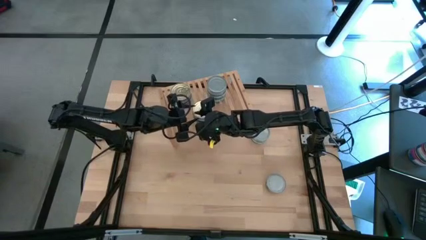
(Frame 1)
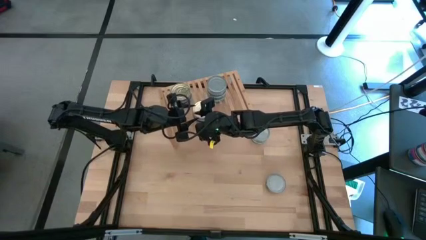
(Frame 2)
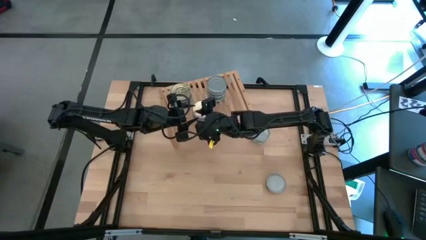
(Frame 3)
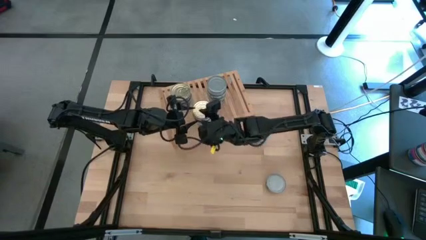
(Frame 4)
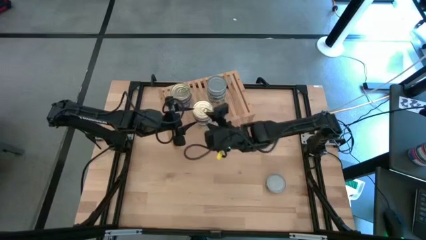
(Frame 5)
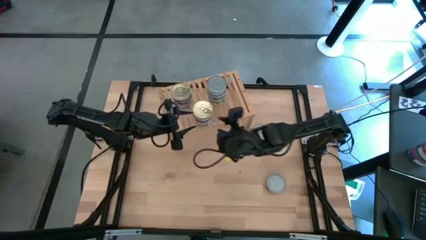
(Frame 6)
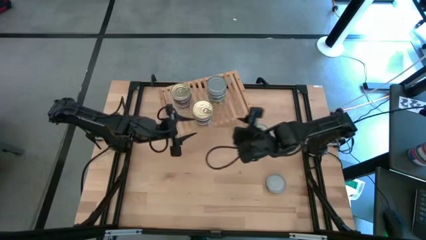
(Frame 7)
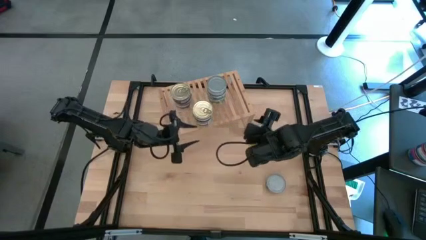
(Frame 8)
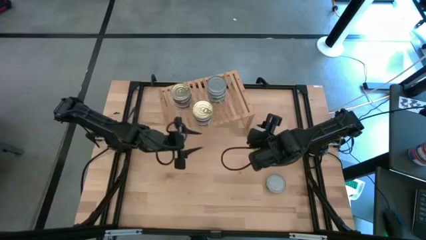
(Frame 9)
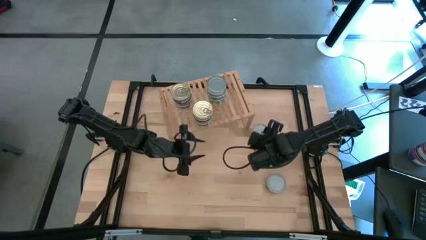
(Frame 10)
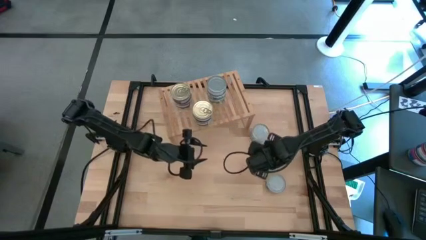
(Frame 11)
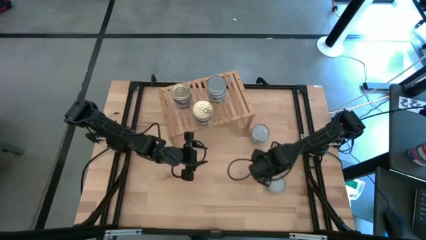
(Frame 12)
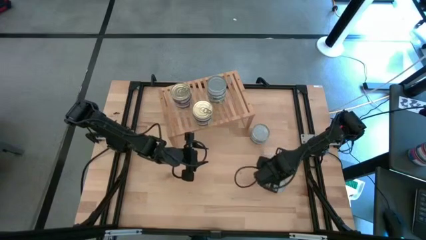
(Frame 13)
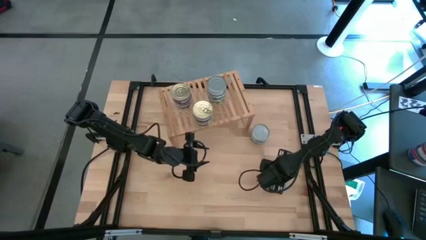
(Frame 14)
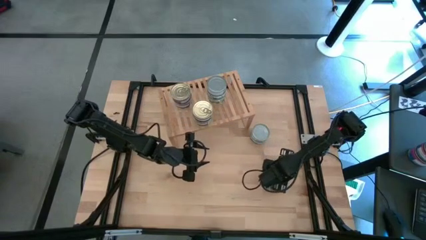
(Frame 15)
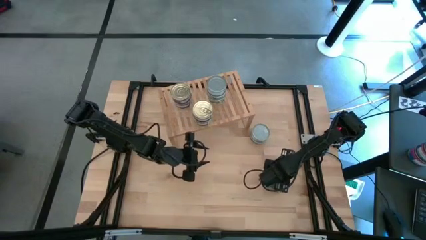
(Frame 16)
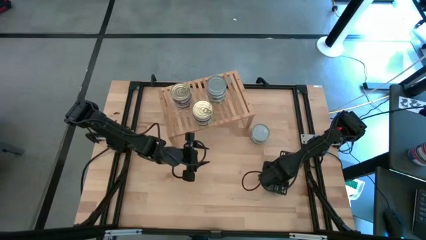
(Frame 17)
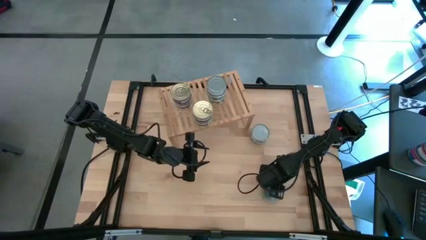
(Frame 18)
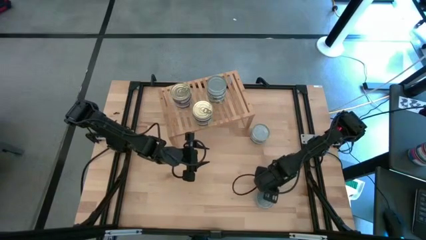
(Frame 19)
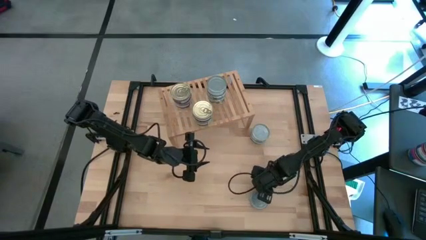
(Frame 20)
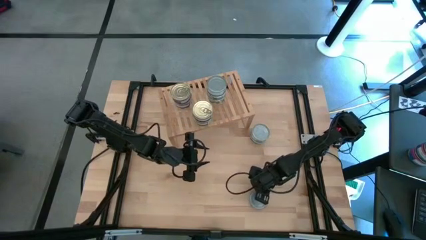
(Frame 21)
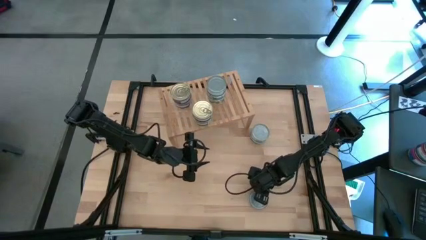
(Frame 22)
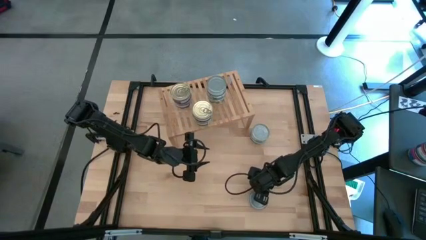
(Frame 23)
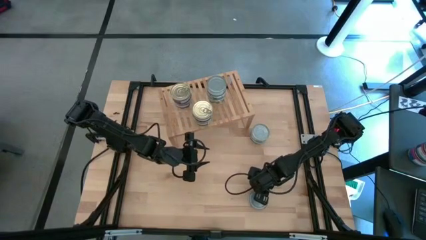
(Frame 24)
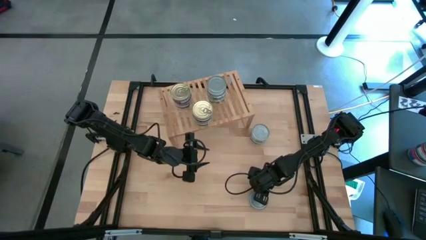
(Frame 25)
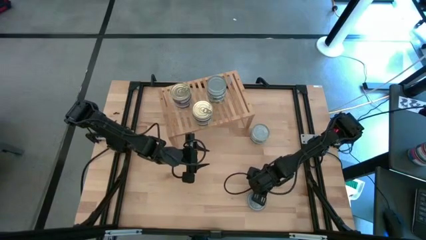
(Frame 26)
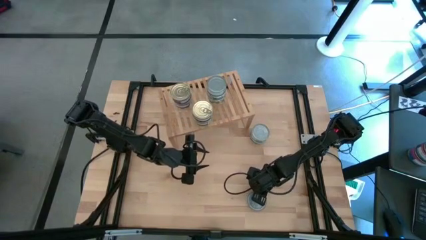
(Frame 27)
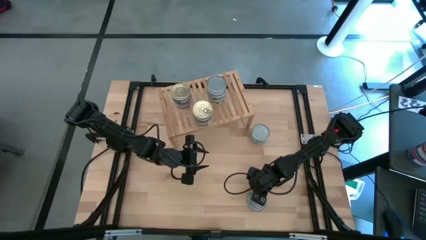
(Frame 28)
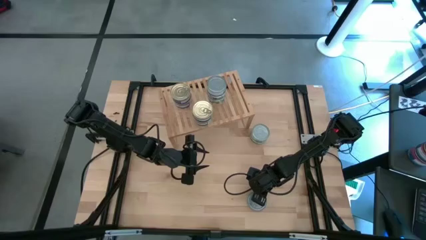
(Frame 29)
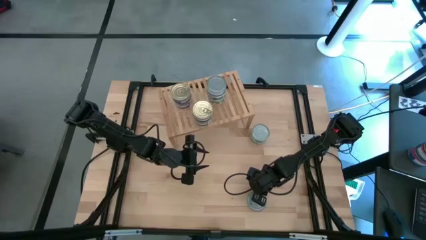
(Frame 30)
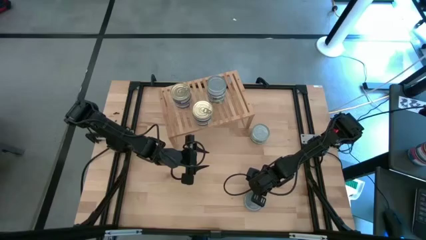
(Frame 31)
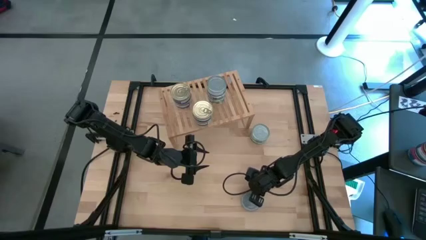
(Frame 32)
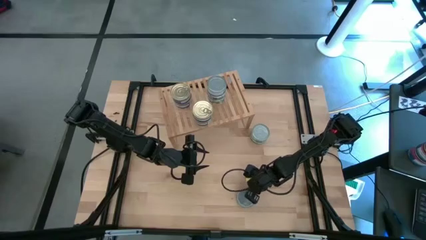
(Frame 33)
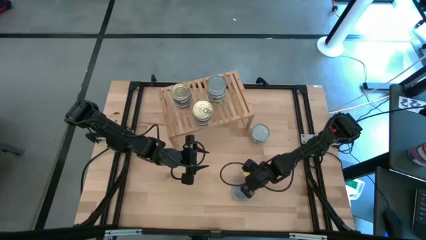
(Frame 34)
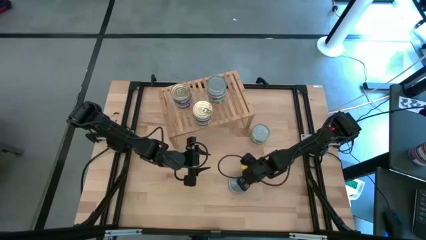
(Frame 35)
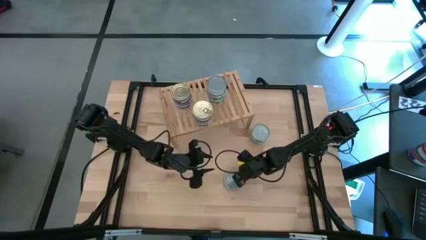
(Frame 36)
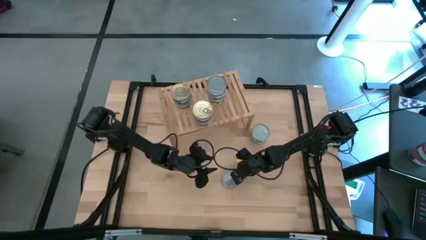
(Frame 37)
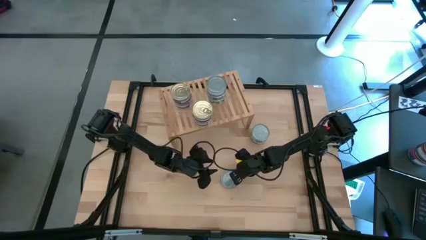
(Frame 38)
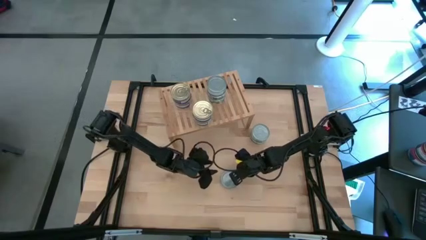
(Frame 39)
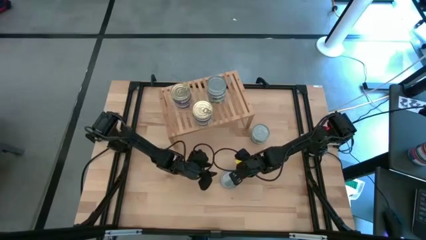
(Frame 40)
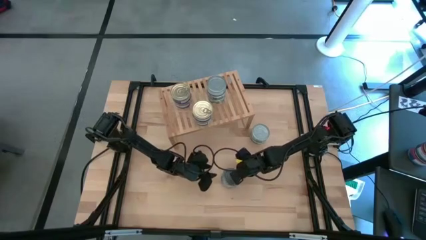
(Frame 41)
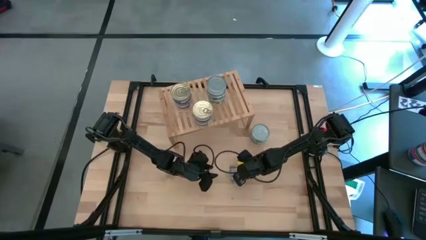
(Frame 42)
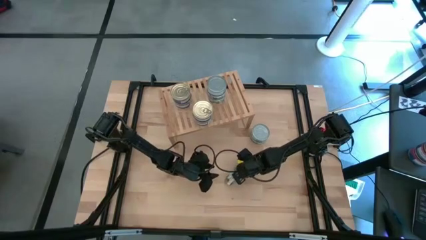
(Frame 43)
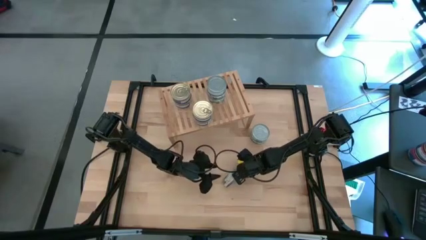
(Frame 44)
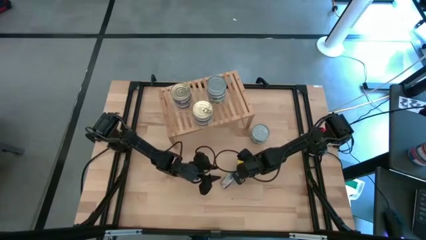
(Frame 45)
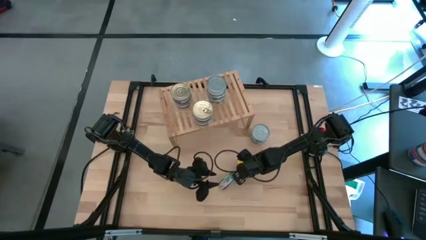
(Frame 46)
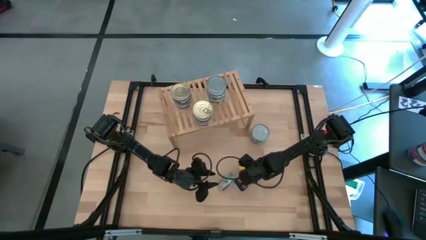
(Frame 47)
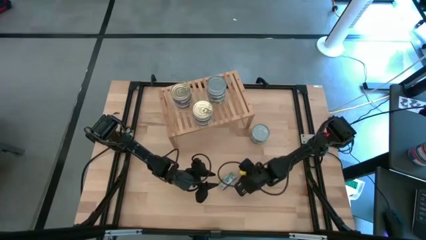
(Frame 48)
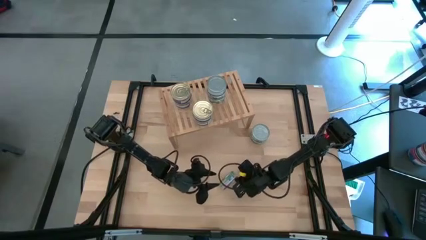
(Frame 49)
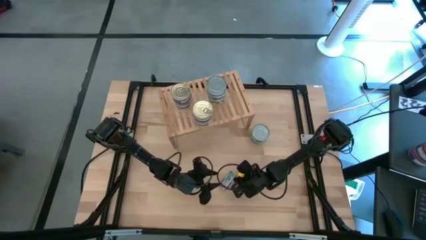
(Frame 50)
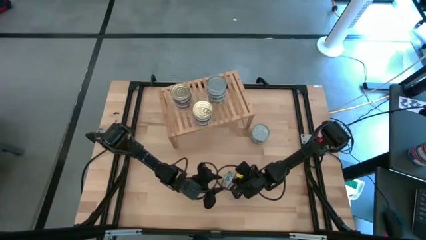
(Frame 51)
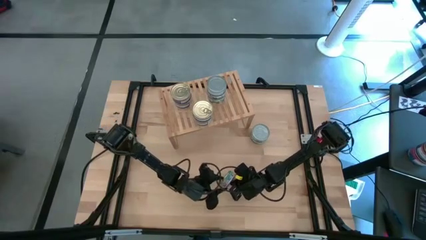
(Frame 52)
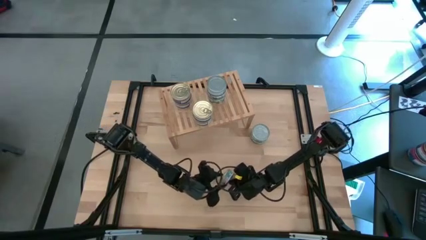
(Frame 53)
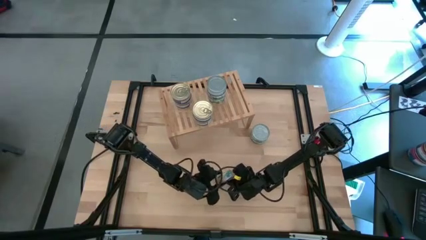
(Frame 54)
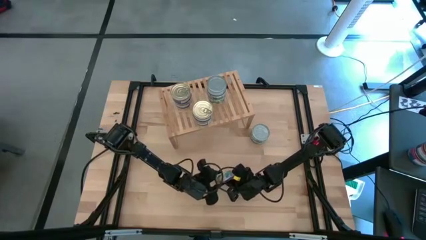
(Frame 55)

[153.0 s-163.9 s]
Task: Stack canned seafood by type on shelf
Put the green tuna can on the shelf aligned with the other green tuna can
